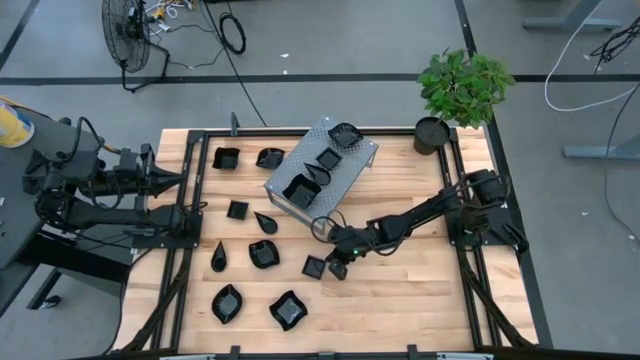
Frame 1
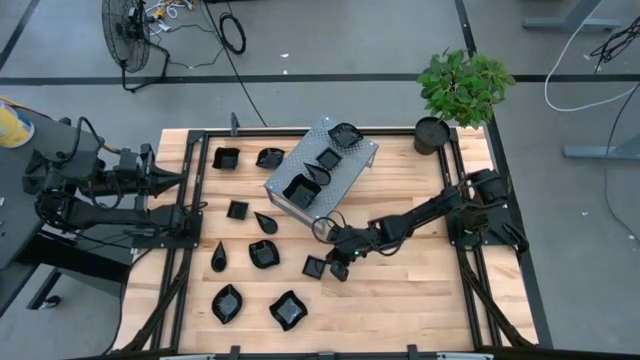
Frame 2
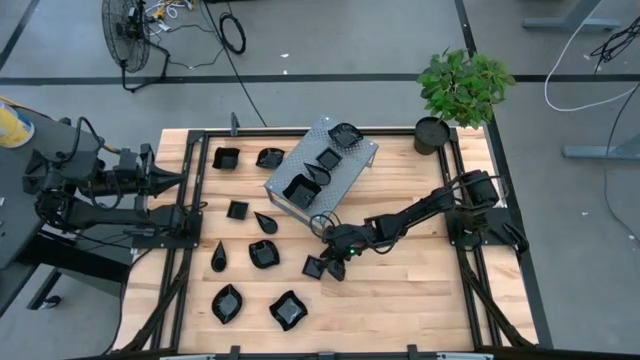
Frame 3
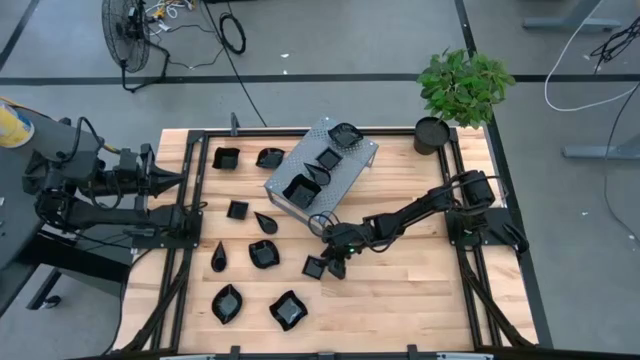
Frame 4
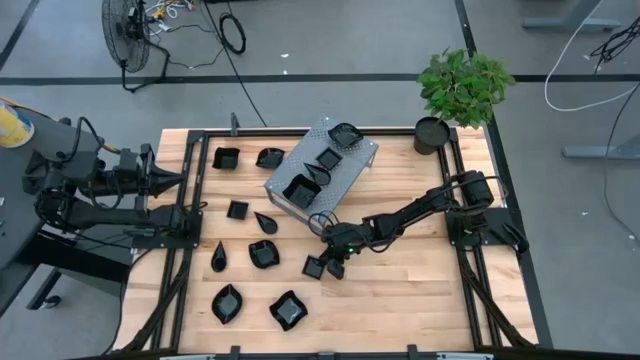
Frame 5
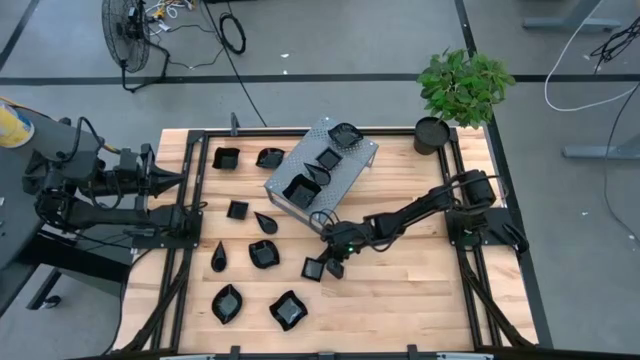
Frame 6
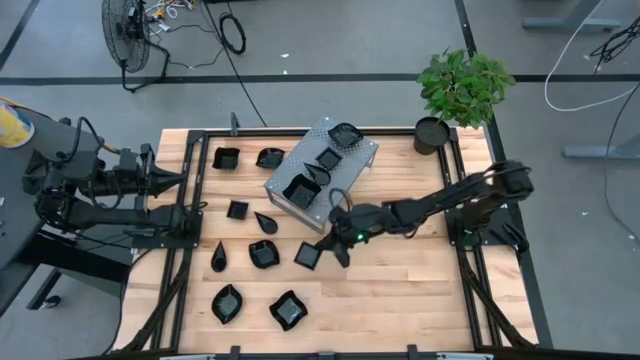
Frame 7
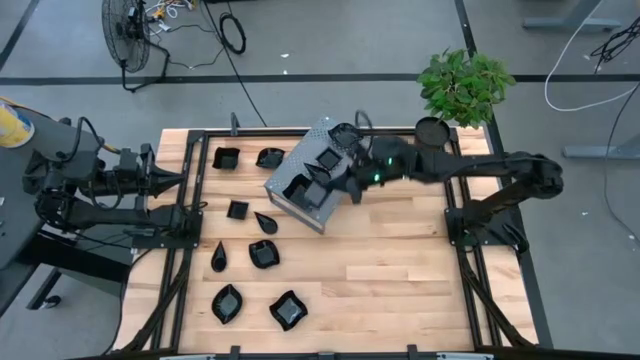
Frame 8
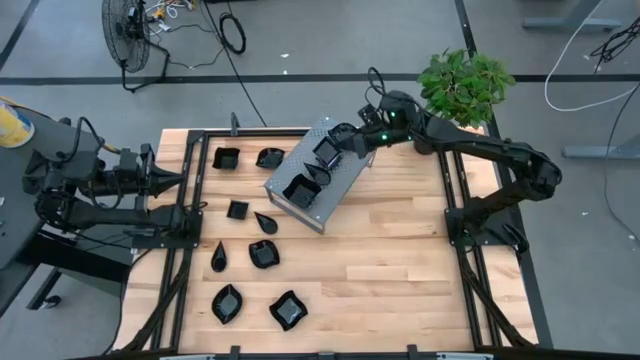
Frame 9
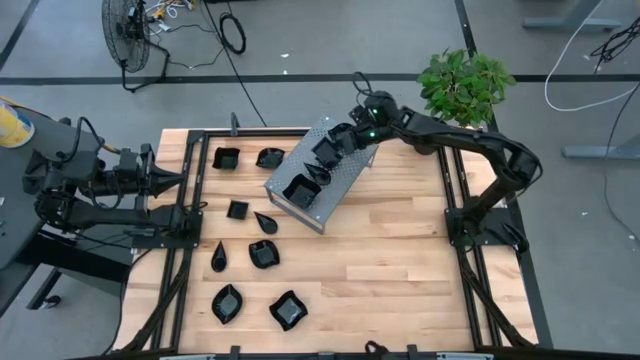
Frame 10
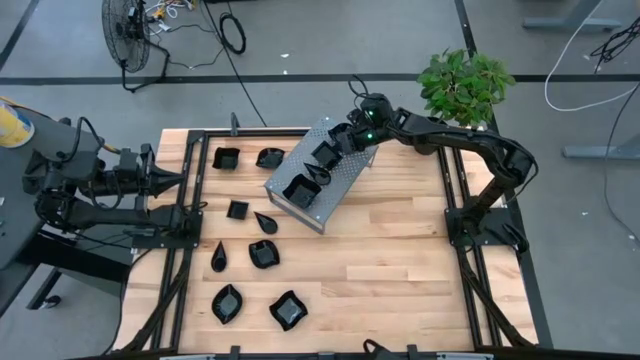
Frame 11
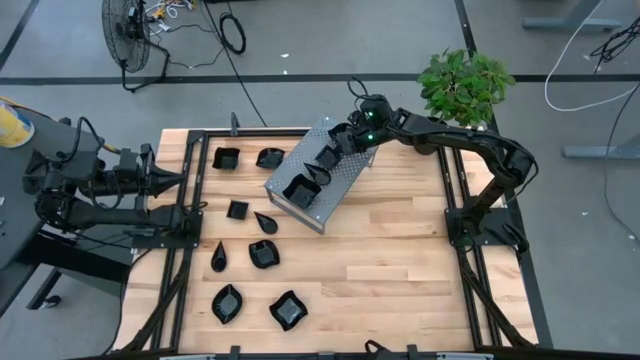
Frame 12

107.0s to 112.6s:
Task: Pick & Place Mini shaped plates
Stack the black square shape plate on top of the black square shape plate on the shelf

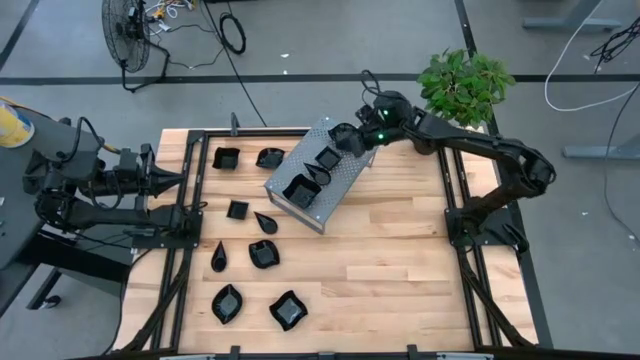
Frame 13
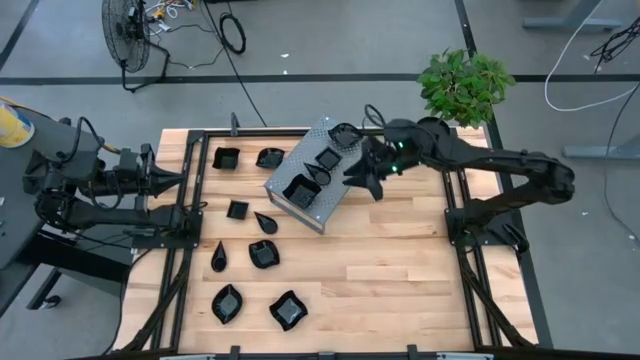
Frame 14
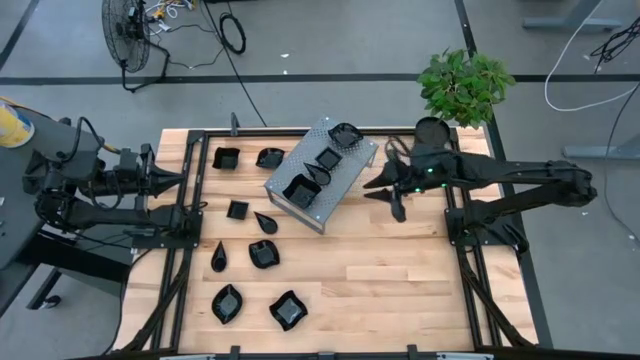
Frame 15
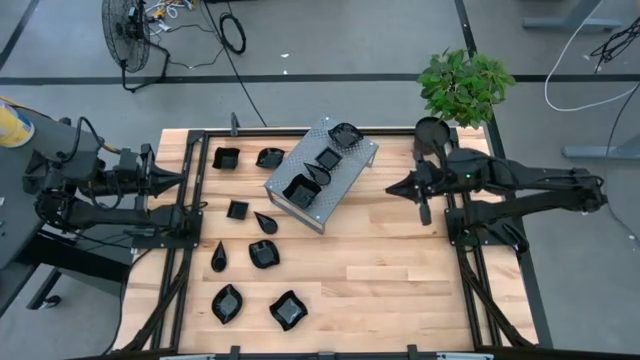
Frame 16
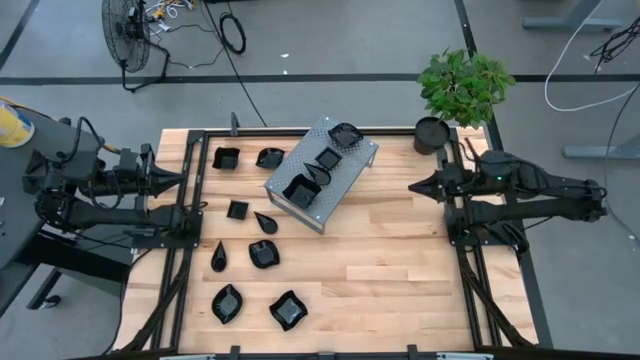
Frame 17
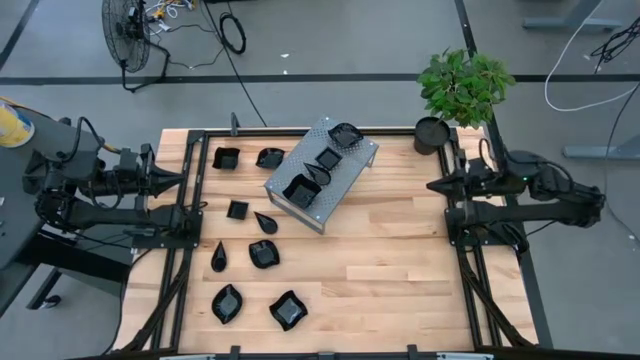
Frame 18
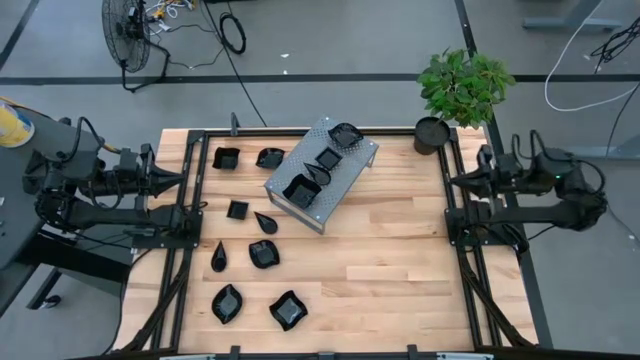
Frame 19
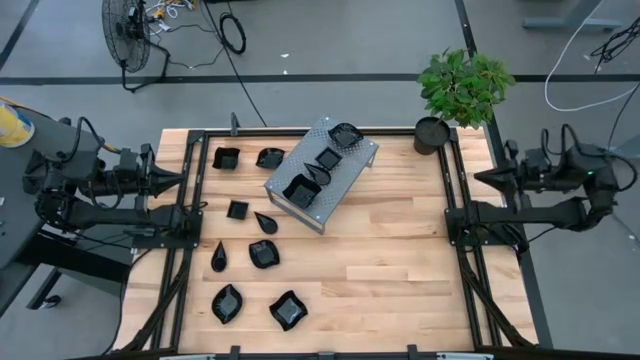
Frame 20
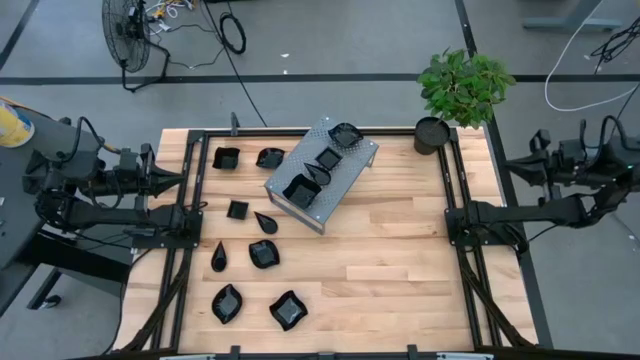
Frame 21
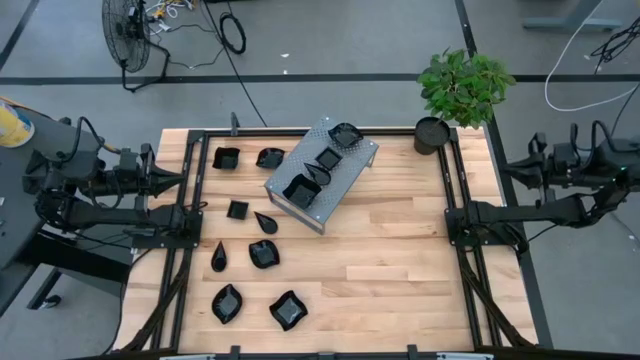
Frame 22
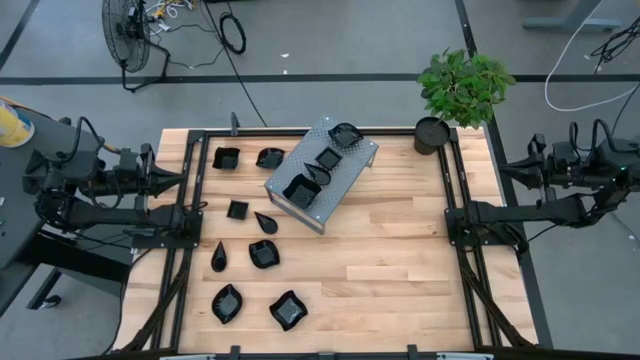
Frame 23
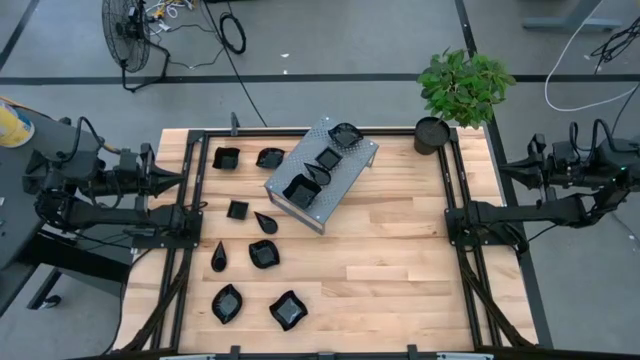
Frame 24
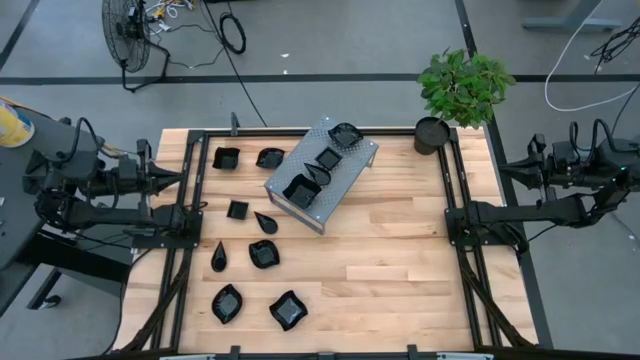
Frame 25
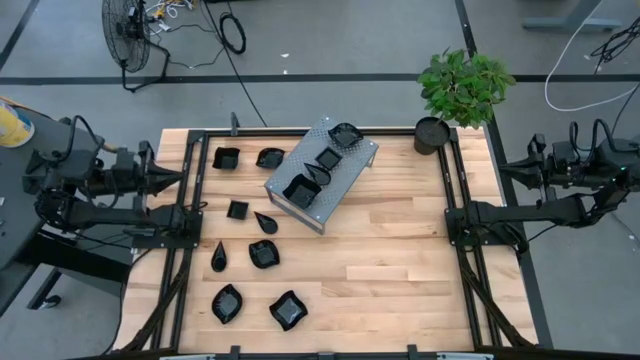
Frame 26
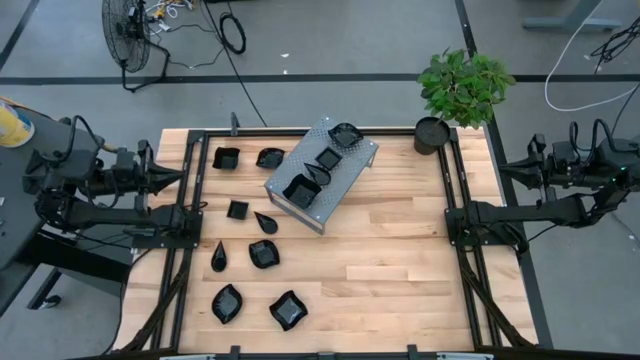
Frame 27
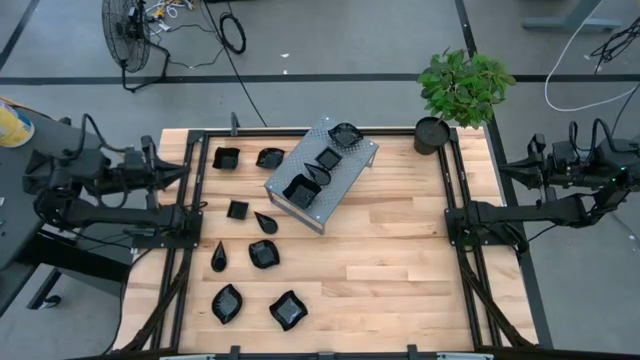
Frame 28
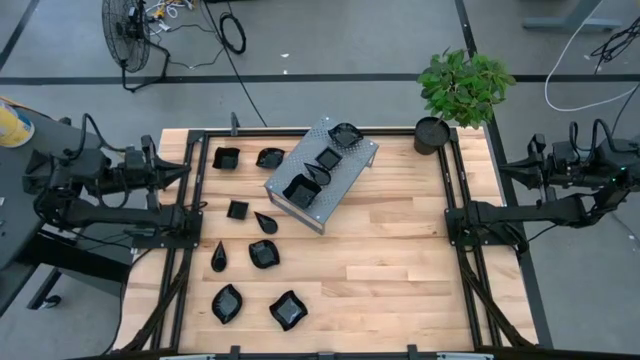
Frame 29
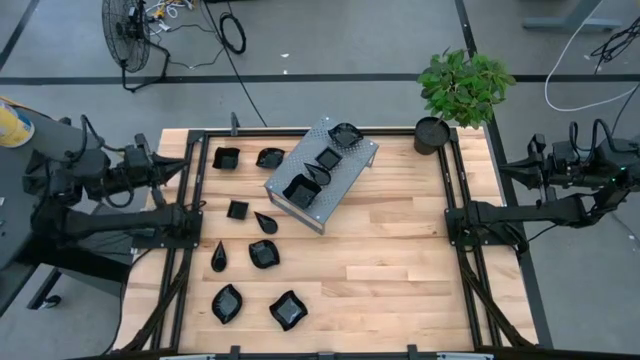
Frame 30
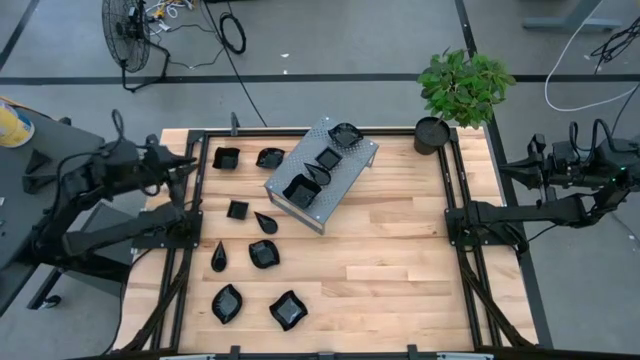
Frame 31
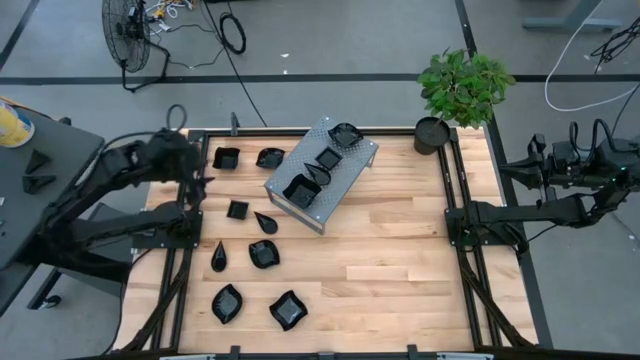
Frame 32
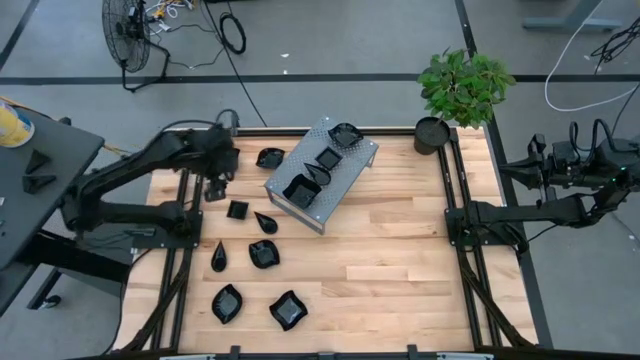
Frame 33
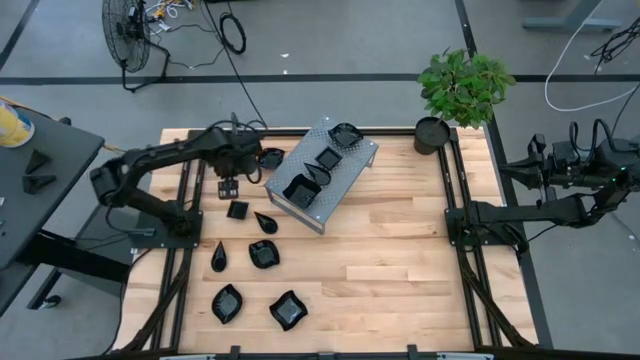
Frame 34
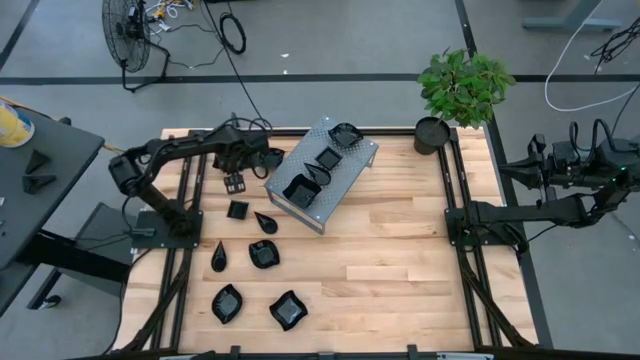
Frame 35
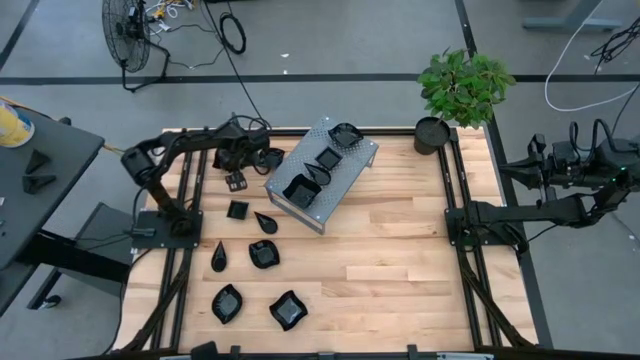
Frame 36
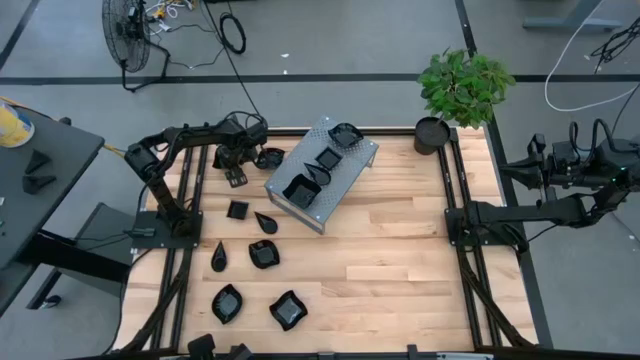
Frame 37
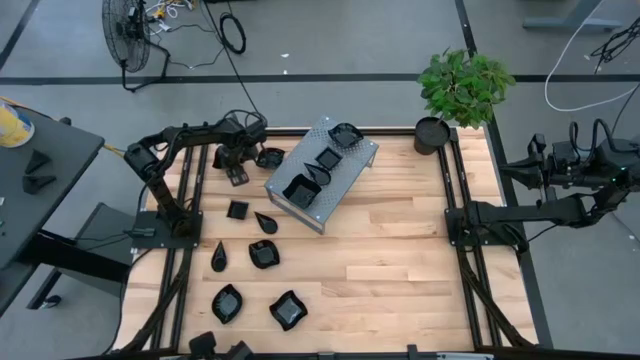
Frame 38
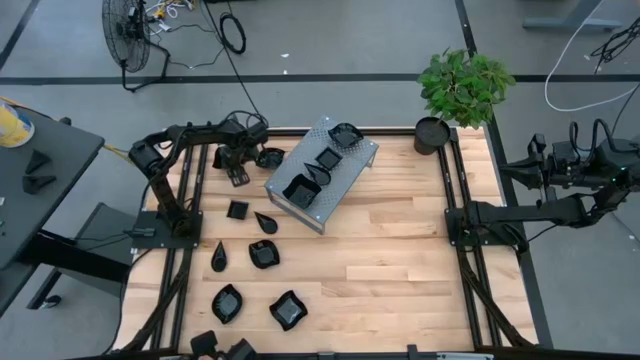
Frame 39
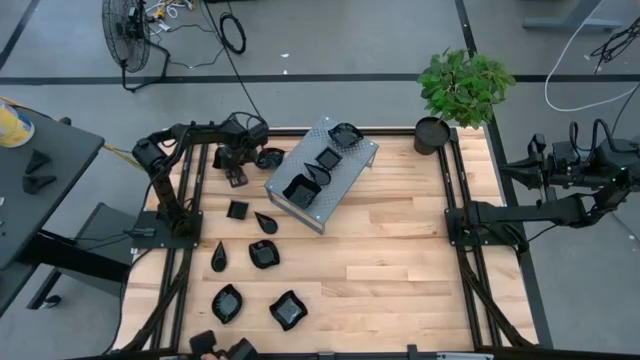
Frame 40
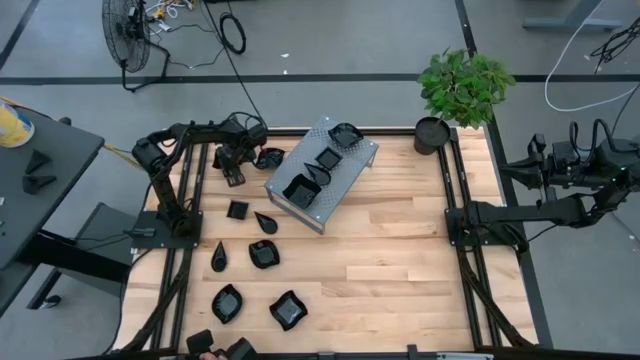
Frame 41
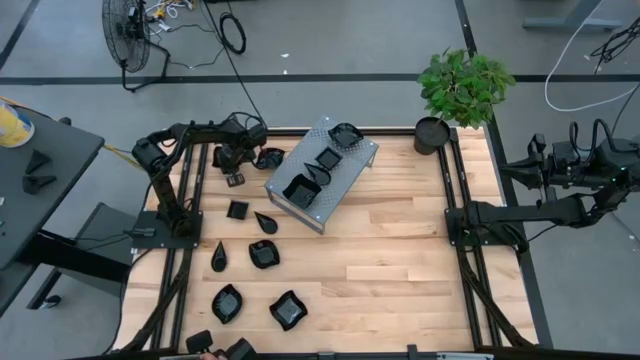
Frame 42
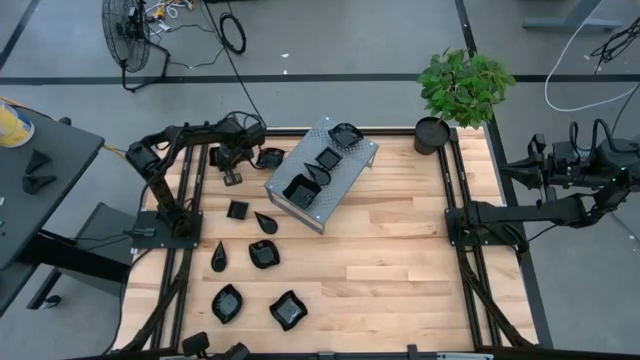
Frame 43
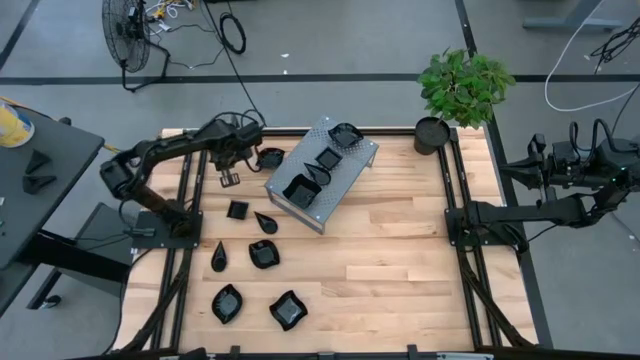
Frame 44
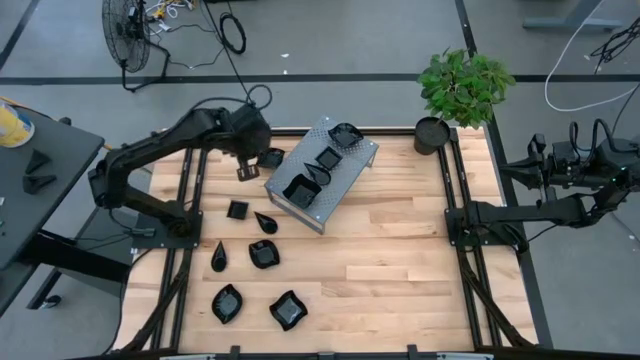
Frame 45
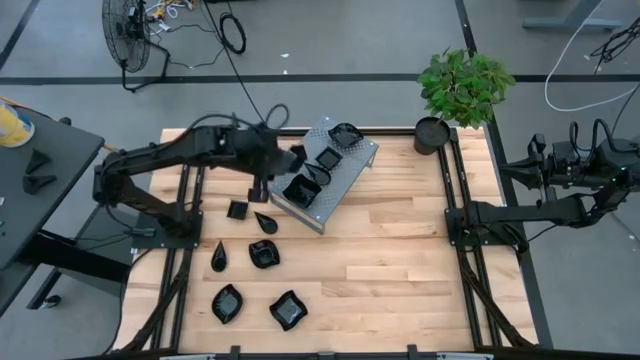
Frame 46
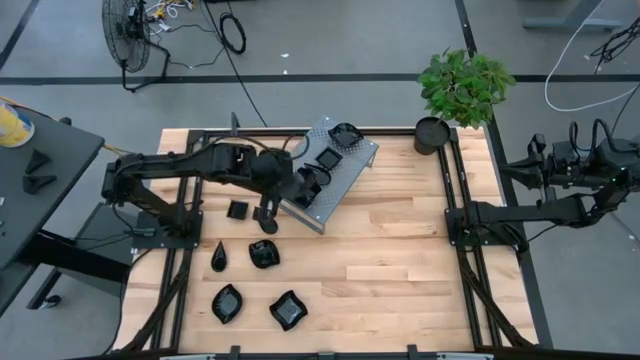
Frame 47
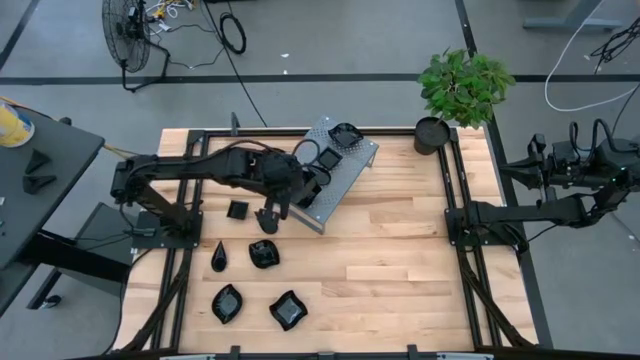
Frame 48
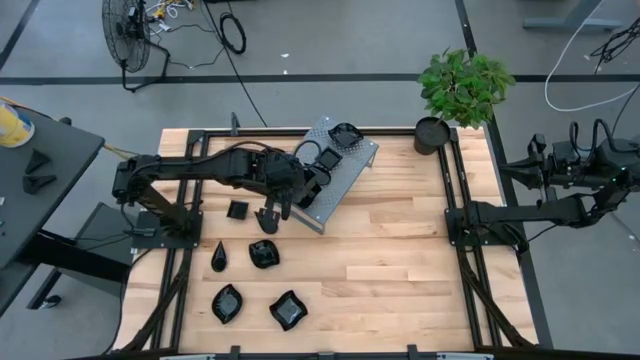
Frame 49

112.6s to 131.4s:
Stack the black distorted square shape plate on top of the black distorted square shape plate on the shelf
